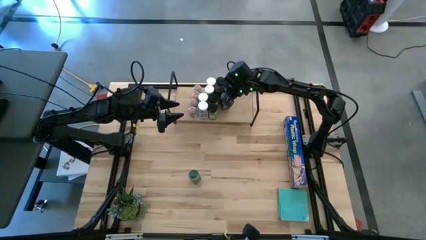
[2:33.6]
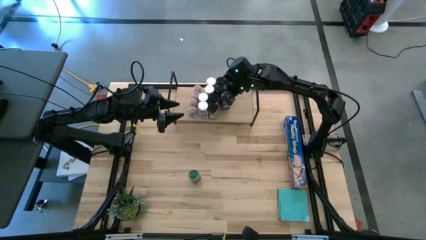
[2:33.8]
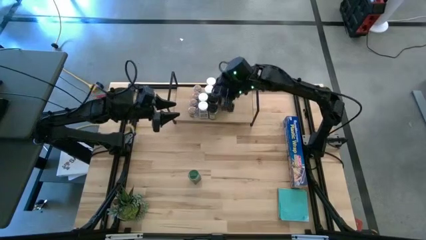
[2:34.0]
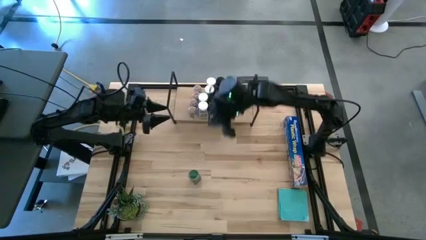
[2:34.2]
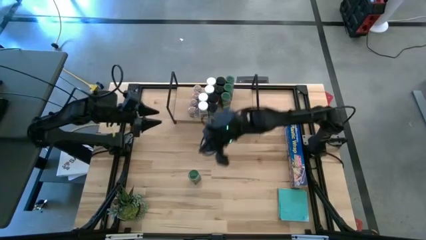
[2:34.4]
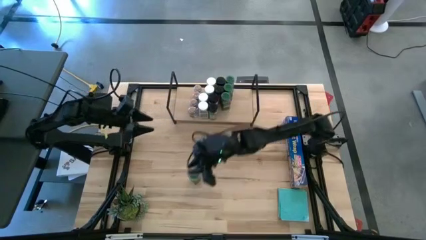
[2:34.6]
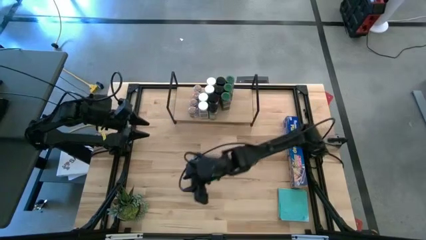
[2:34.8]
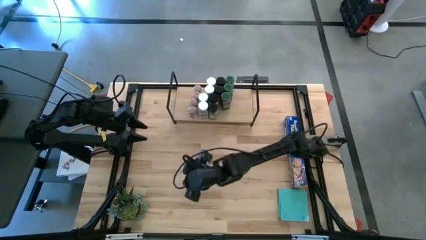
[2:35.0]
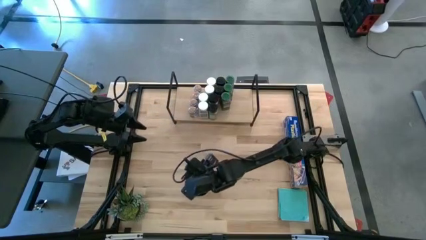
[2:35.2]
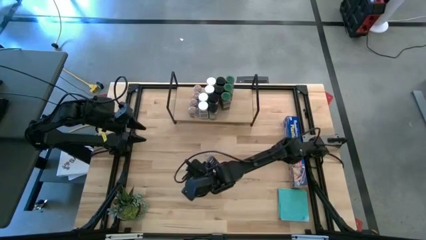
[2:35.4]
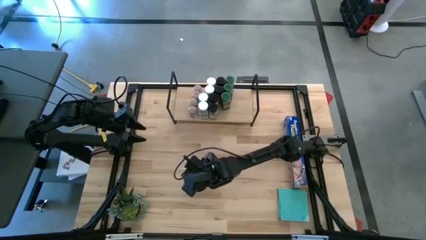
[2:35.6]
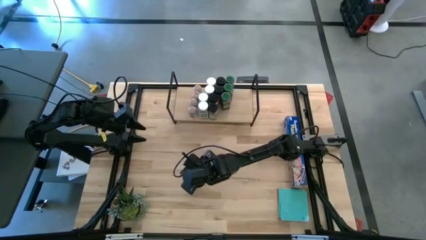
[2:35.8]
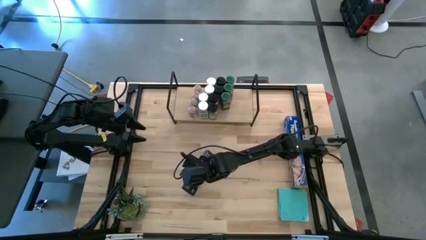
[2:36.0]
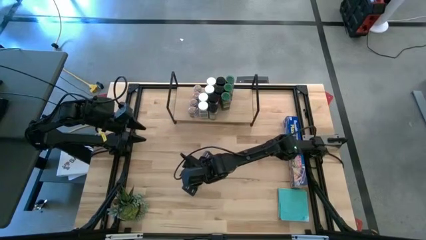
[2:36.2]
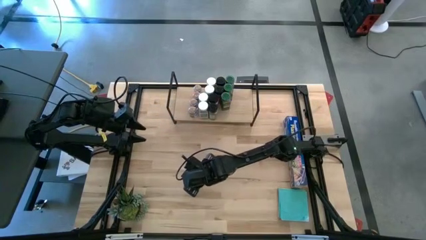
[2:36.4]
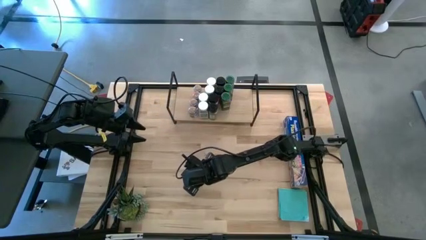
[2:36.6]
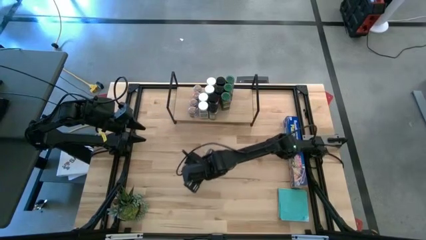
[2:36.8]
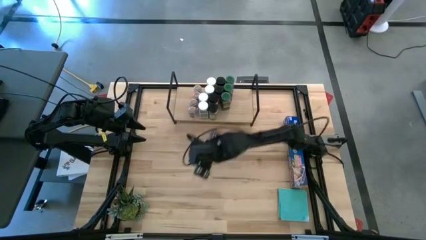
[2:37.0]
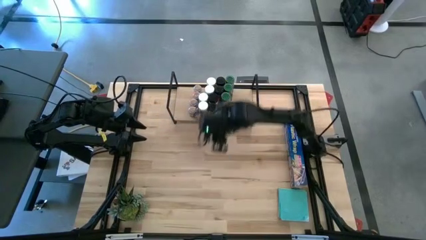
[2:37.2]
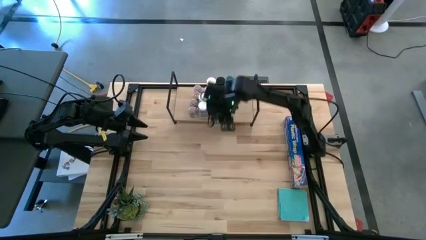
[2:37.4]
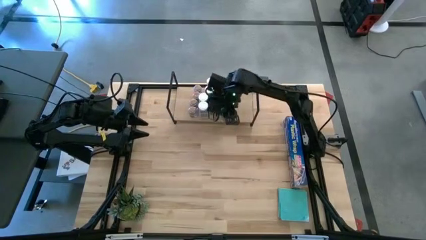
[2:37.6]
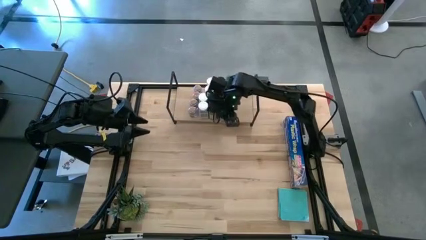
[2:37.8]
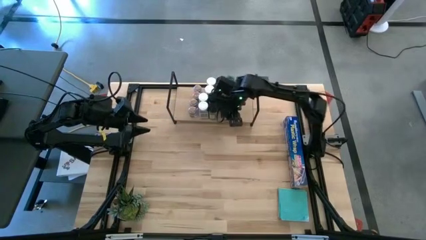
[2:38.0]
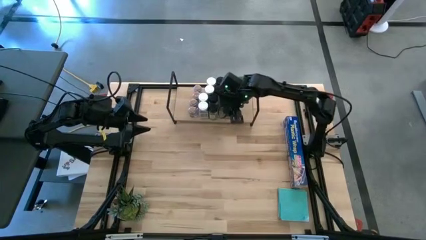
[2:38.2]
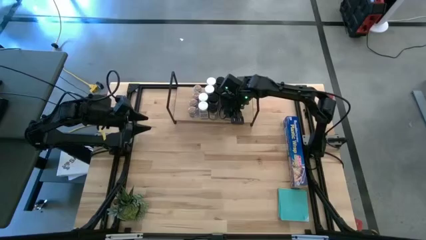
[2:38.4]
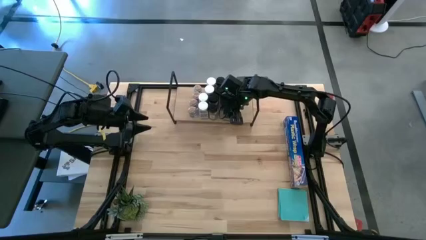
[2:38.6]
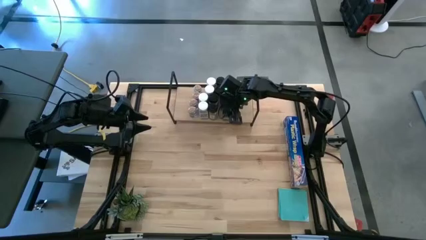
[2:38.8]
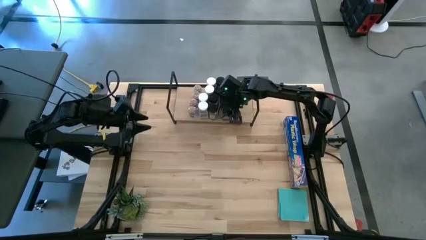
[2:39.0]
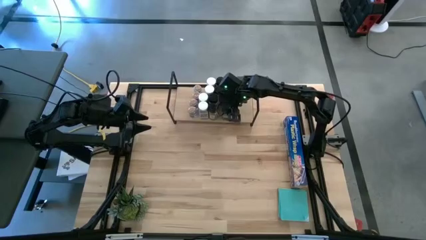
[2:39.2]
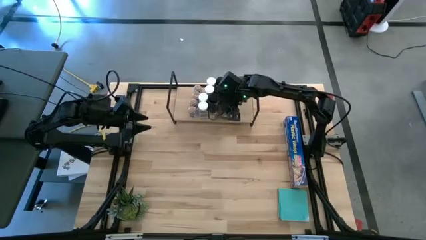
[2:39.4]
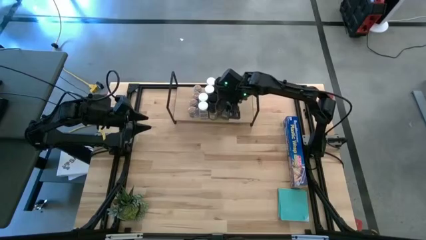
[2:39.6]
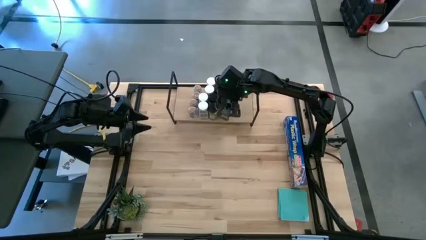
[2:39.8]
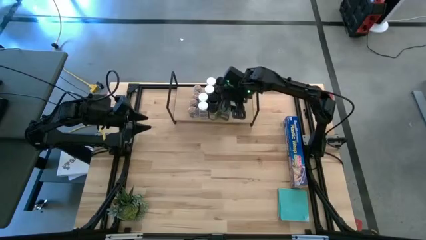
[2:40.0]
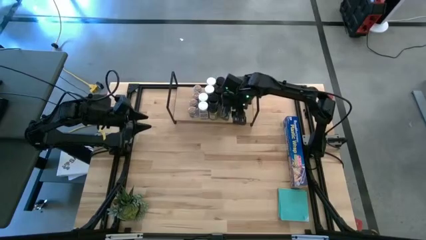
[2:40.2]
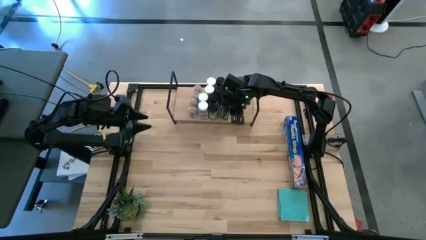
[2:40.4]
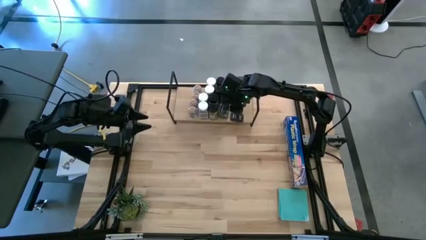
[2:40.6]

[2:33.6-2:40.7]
Task: Shelf spices
Put the green seasoning bottle on the shelf aligned with the other green seasoning bottle

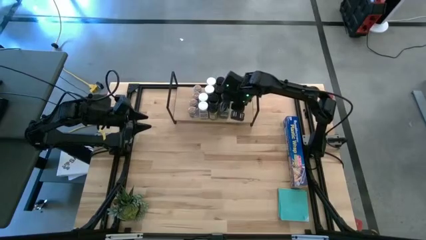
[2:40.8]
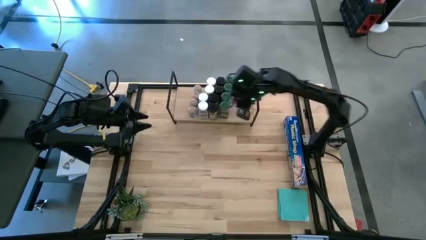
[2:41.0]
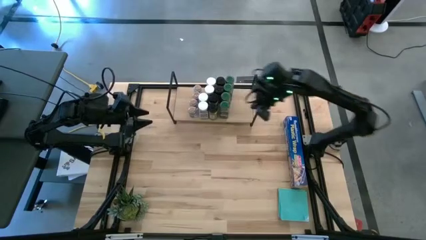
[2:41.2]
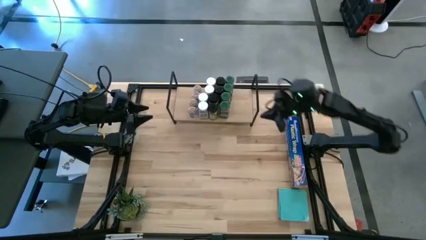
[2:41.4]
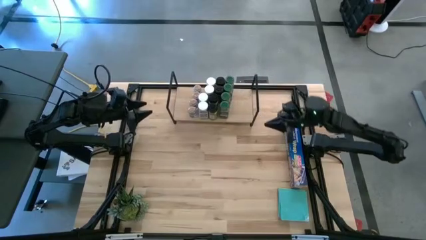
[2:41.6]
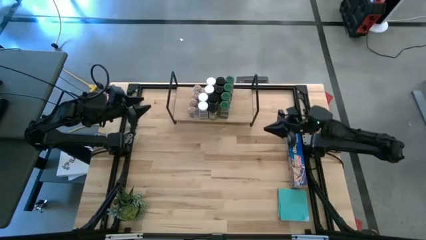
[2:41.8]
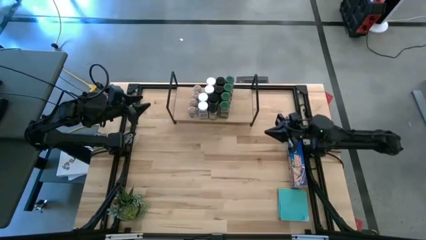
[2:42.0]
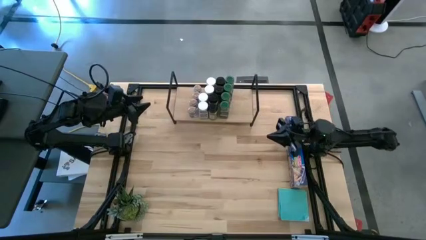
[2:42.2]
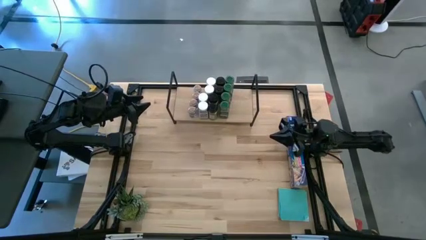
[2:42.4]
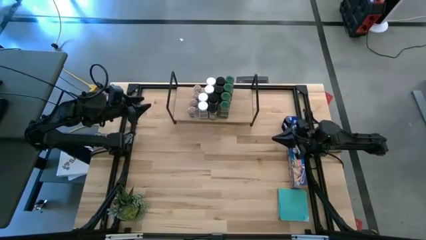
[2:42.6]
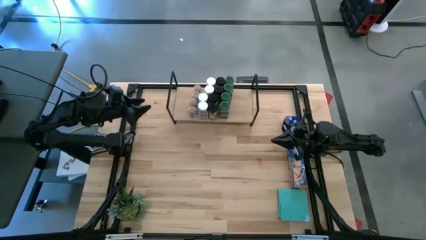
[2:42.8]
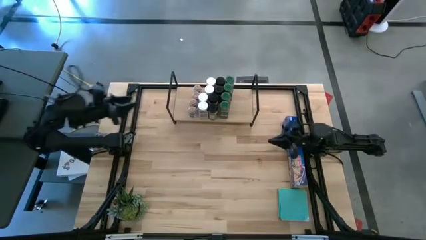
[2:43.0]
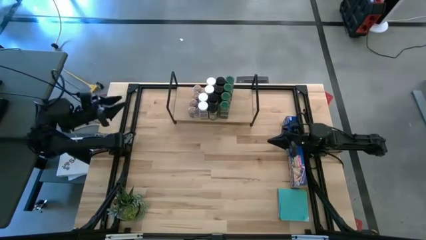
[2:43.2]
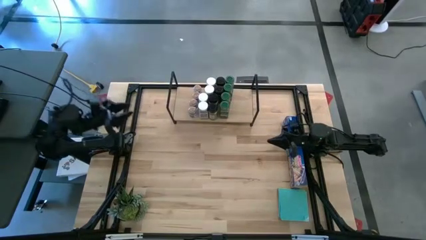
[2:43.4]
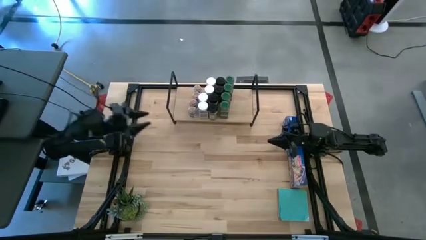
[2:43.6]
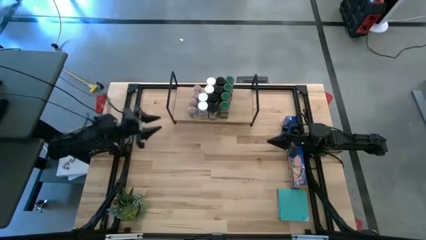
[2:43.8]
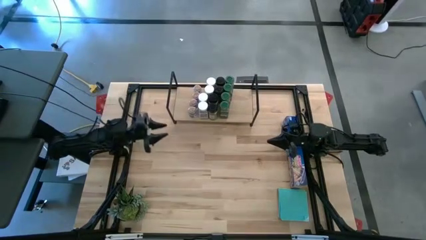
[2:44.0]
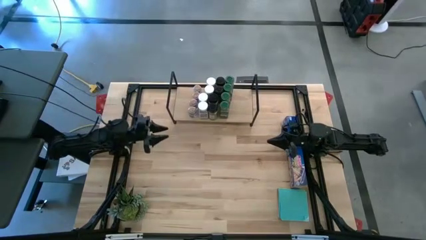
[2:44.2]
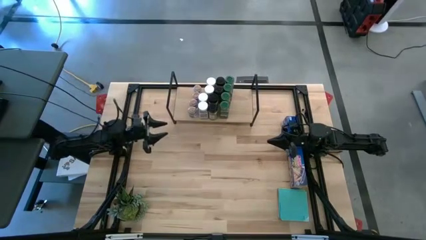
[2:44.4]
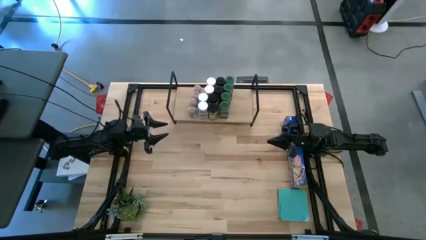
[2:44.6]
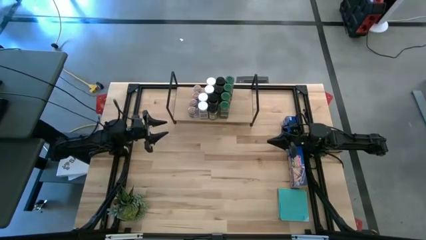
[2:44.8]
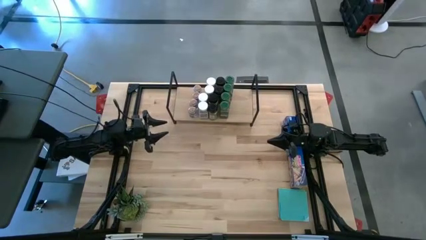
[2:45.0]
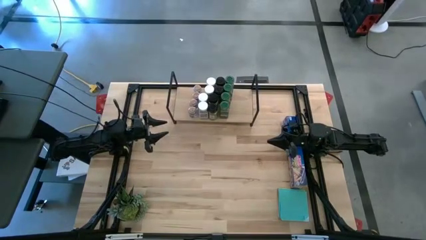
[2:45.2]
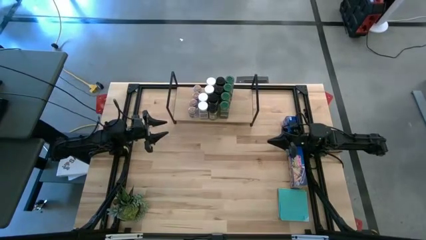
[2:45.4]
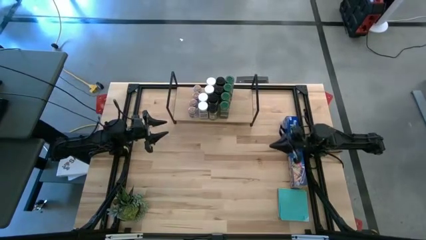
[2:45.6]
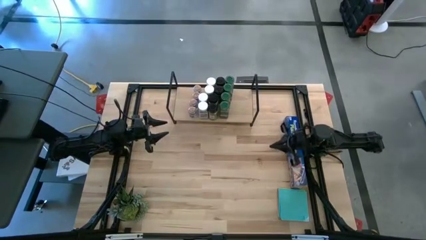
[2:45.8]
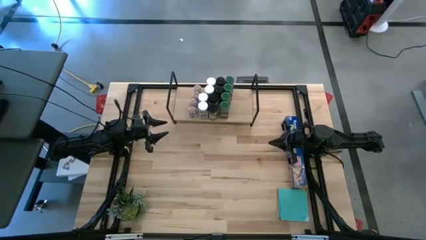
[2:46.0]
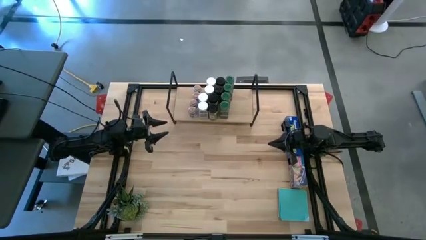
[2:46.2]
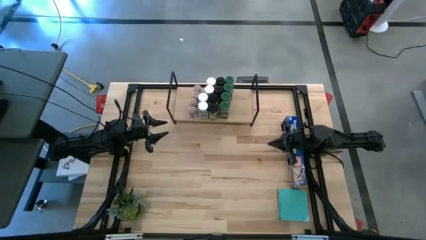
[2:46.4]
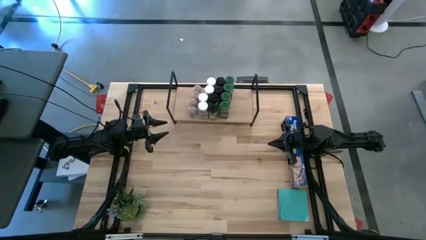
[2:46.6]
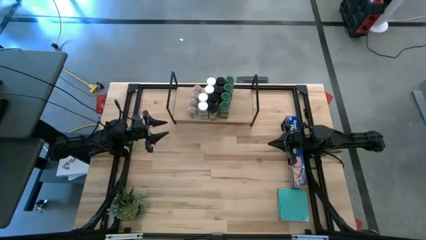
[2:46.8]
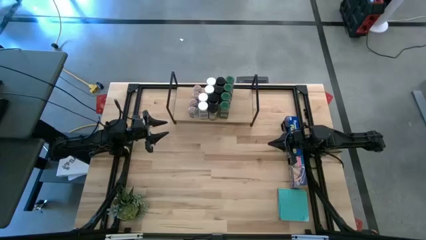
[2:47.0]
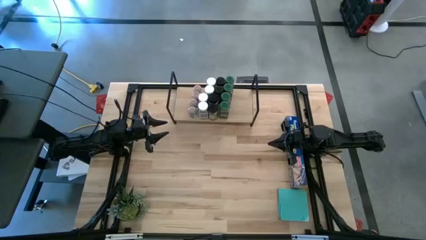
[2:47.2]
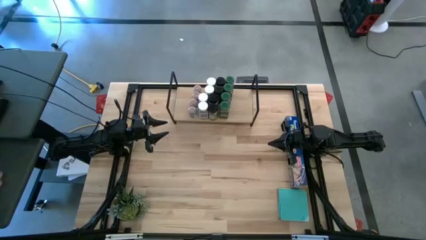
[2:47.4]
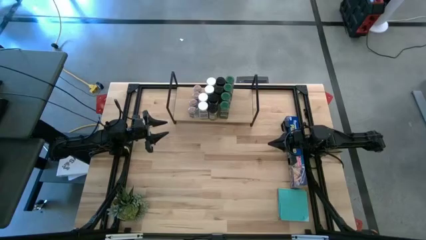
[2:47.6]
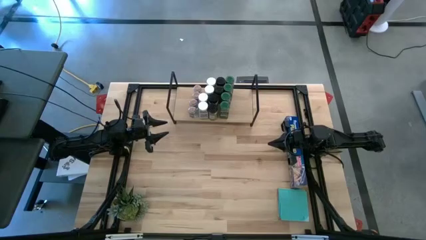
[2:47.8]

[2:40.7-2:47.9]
Return to Home Position
